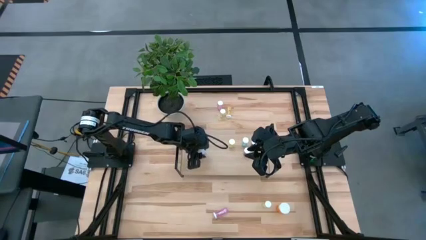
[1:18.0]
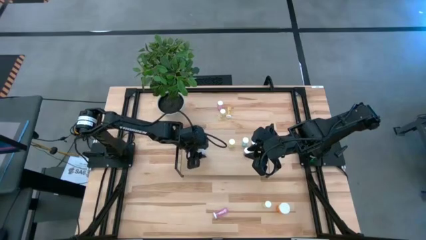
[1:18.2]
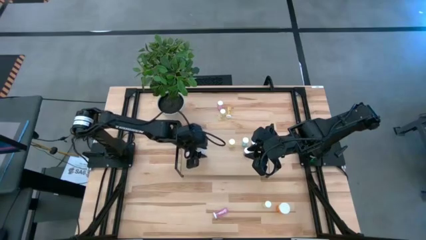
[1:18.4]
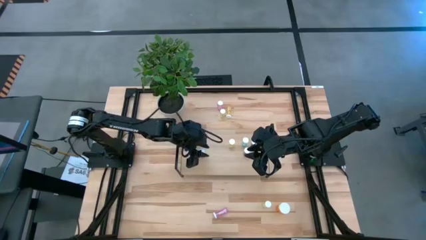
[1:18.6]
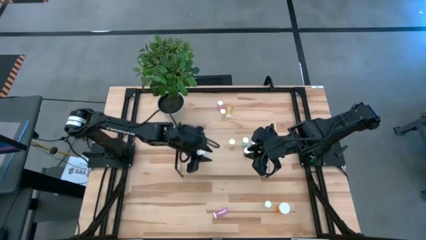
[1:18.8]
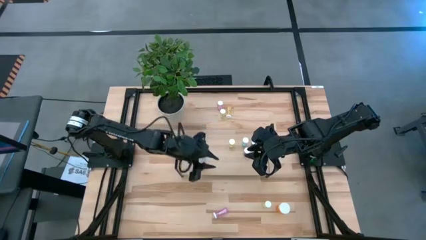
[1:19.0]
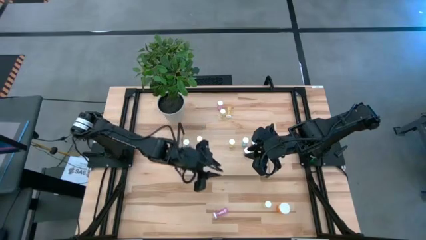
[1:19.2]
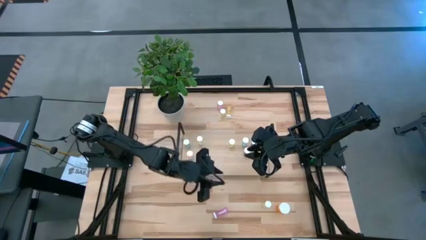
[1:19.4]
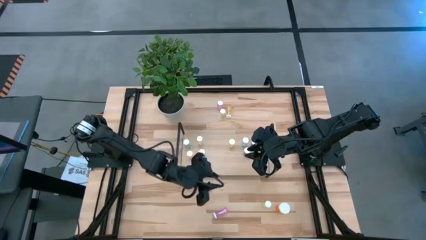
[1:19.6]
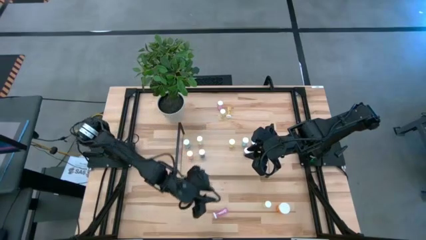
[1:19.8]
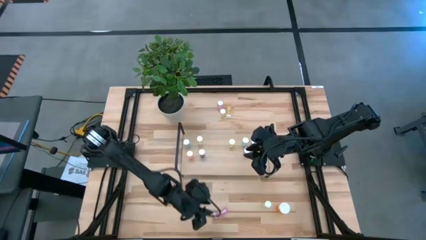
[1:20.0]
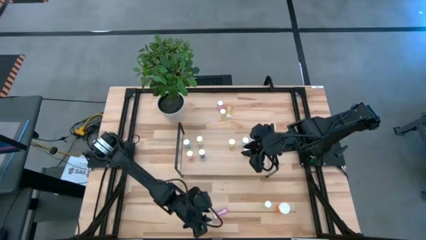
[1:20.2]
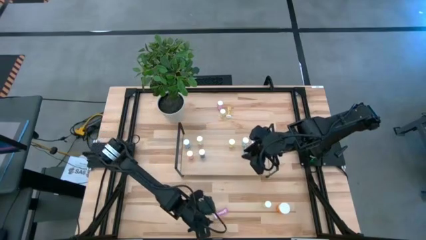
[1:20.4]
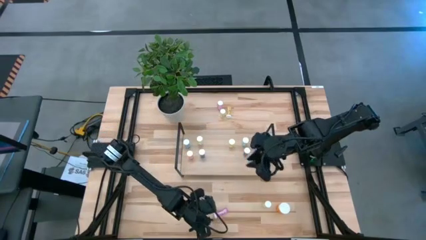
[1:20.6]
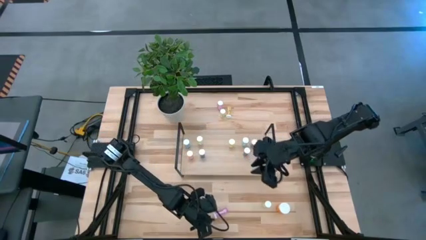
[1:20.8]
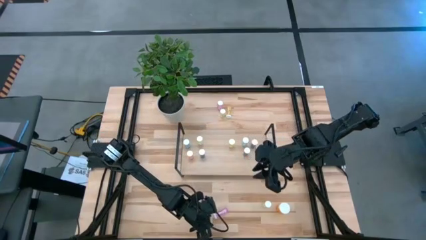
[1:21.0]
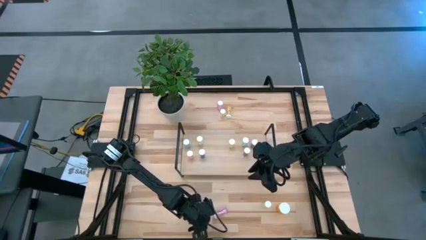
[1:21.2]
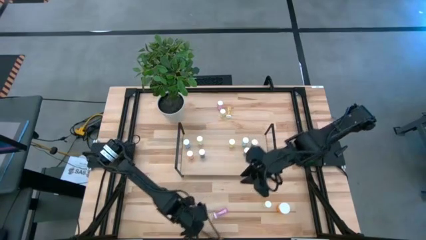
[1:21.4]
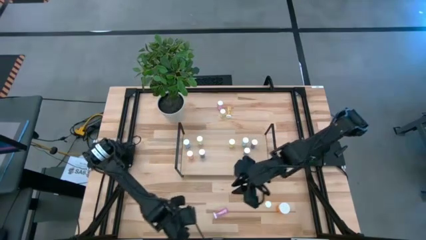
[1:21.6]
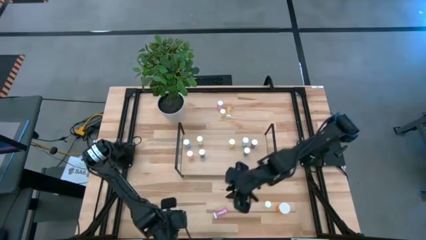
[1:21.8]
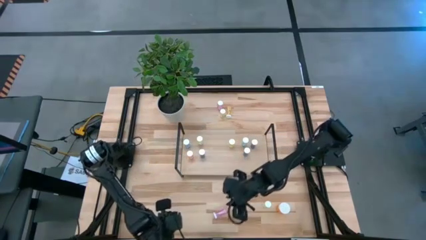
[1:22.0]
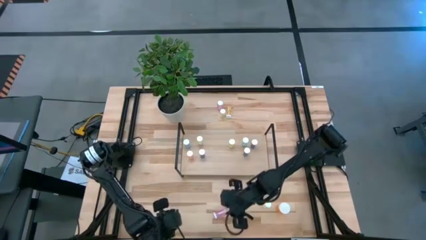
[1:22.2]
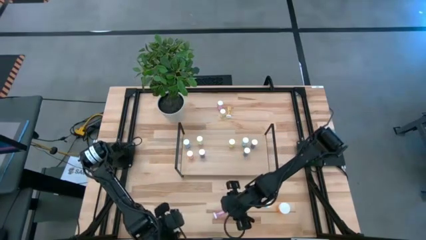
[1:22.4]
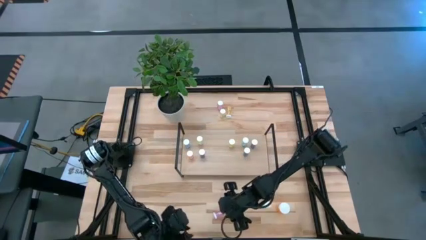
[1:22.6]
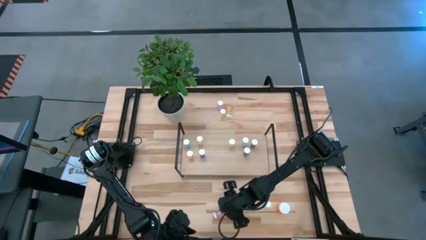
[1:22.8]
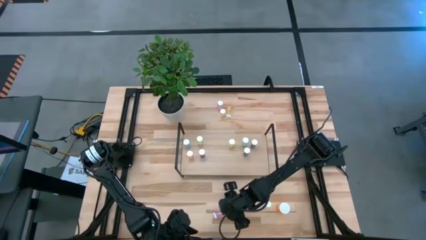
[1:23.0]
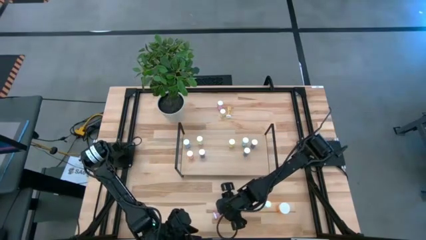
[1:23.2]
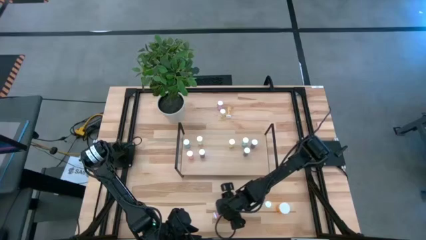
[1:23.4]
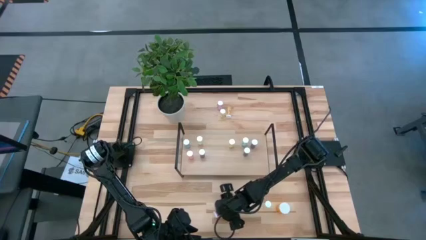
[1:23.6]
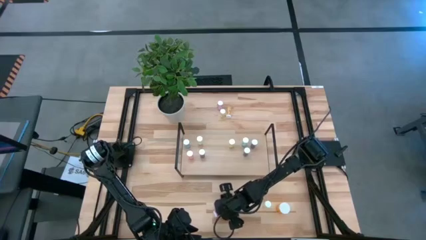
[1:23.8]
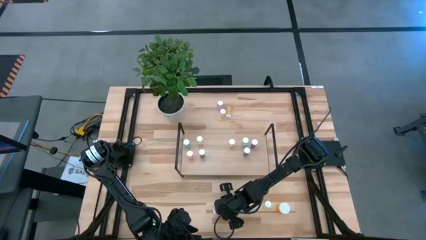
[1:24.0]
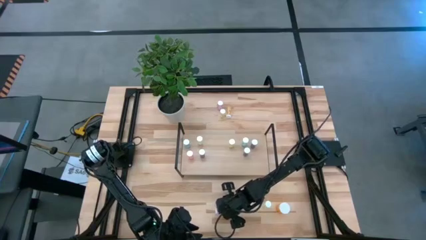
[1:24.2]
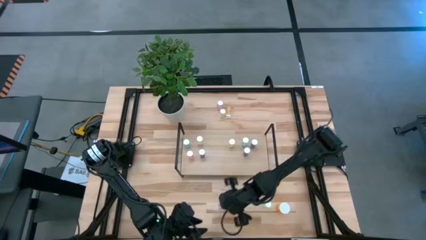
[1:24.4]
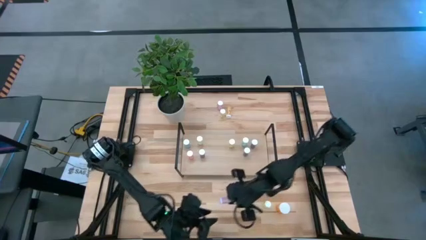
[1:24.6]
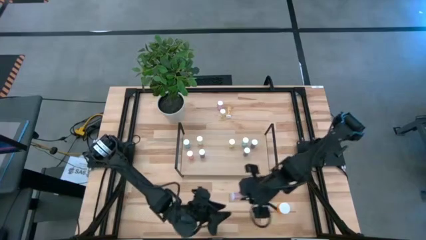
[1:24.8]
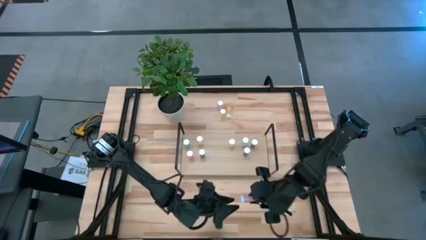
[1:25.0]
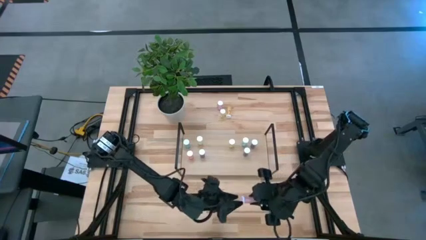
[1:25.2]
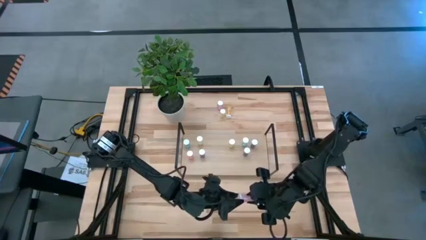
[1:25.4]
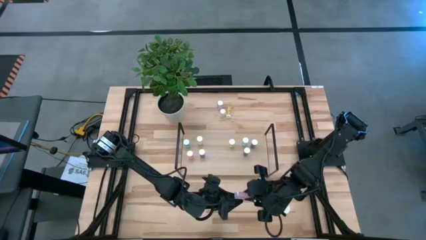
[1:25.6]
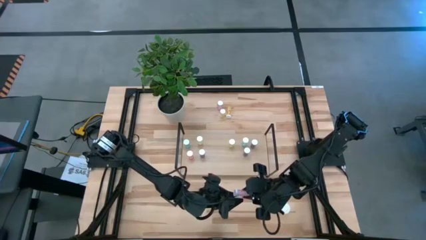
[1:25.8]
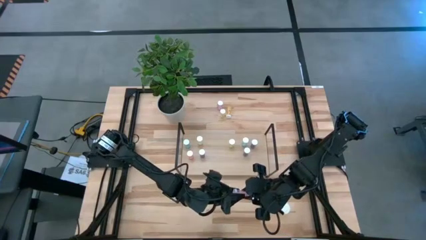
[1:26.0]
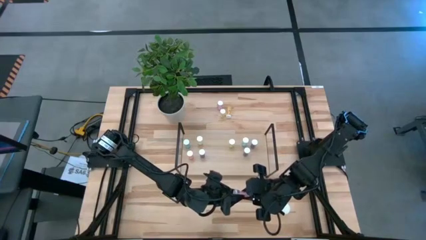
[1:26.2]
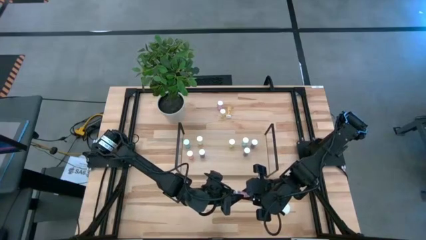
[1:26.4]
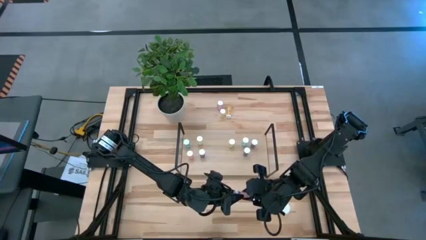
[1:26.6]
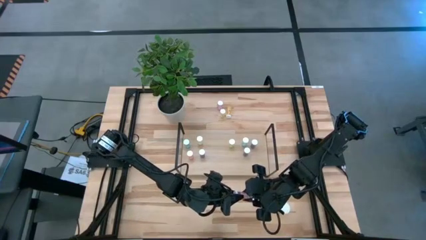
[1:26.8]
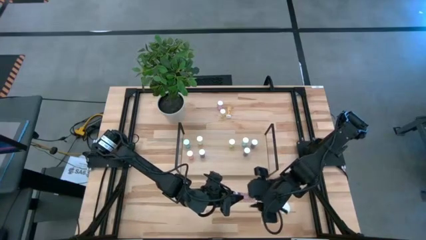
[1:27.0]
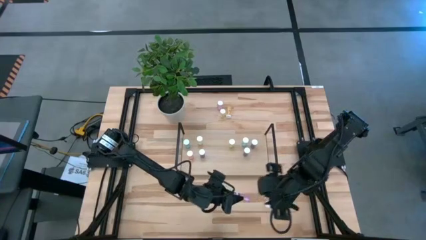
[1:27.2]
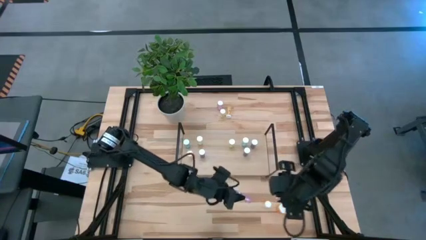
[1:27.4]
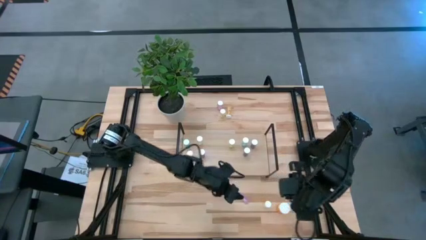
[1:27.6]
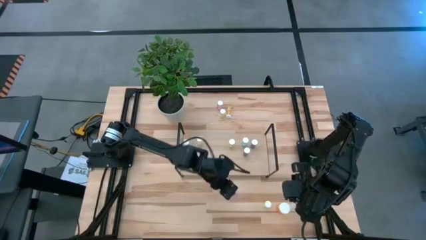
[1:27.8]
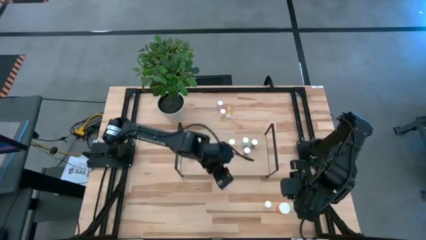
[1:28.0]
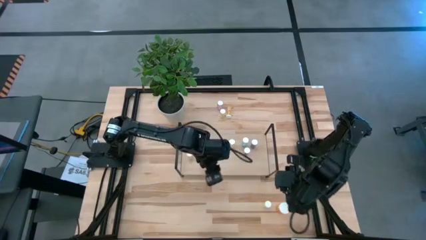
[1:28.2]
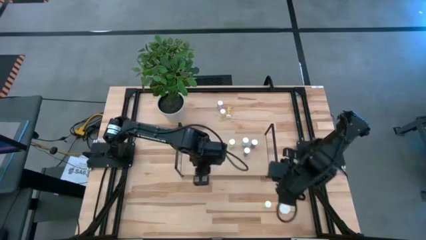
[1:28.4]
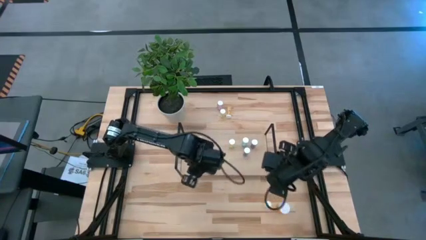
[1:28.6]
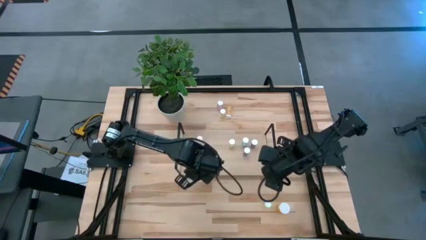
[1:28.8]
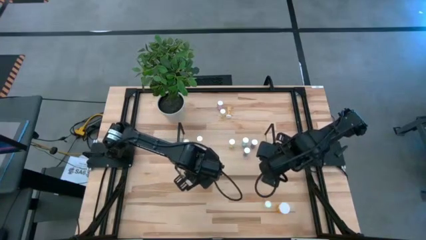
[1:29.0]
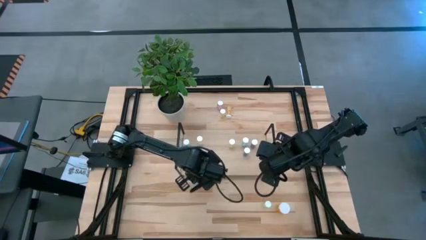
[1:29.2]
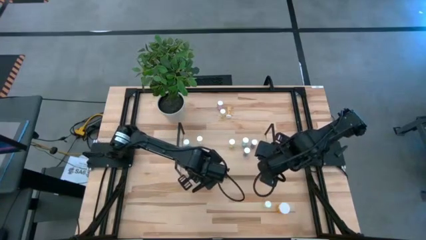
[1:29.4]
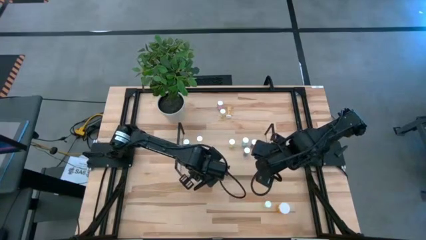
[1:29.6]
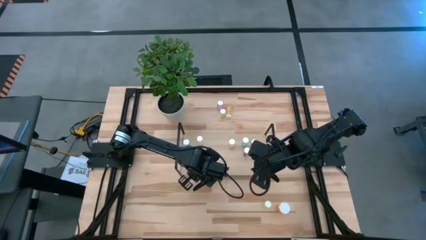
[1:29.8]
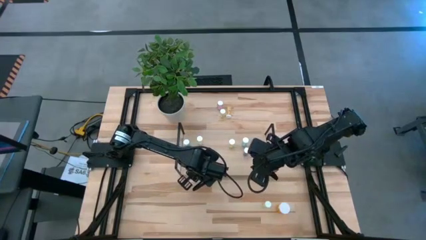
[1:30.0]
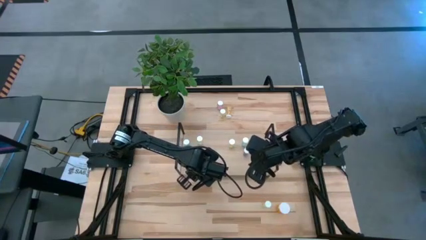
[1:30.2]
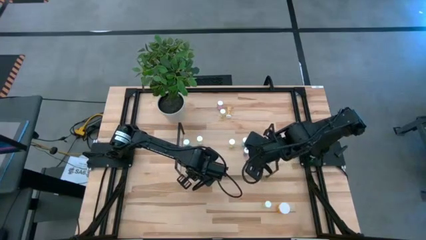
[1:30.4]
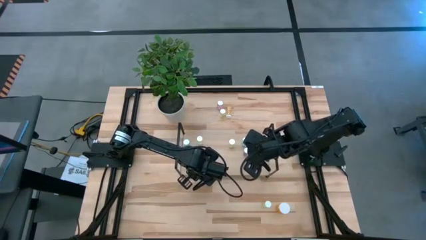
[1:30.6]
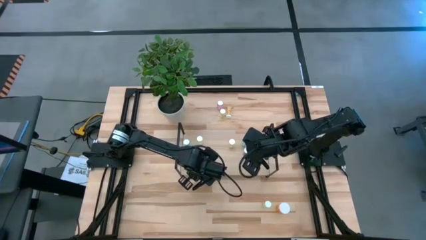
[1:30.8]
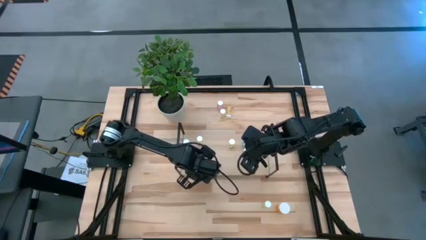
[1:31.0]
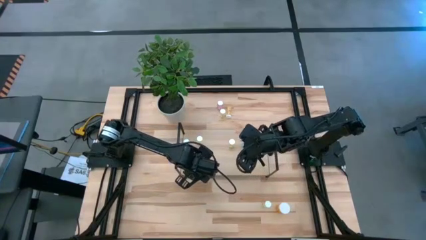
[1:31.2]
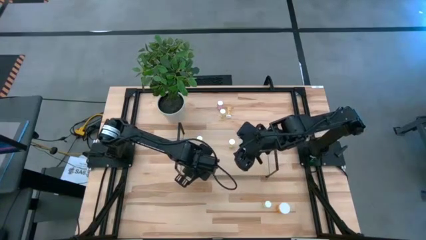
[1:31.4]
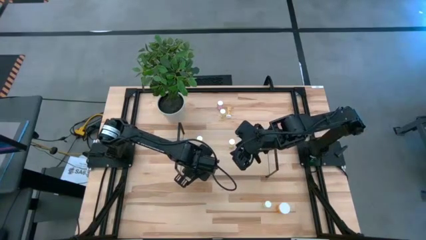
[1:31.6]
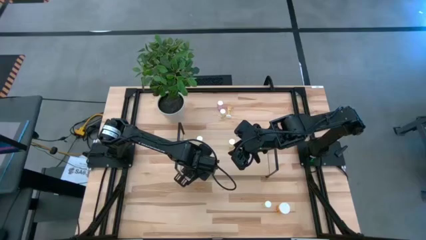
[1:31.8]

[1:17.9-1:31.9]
Task: Pick and place medicine bottles onto shelf by color
Put the pink pill bottle on the shelf
